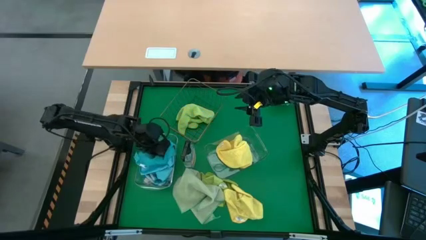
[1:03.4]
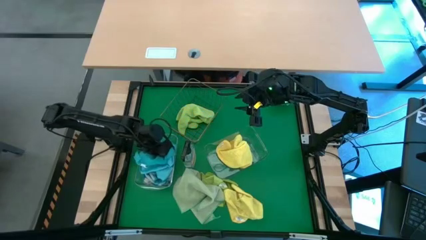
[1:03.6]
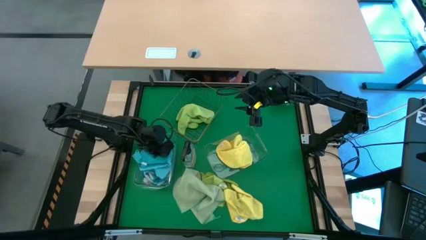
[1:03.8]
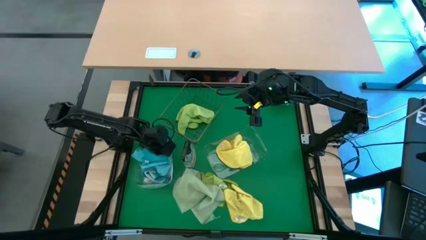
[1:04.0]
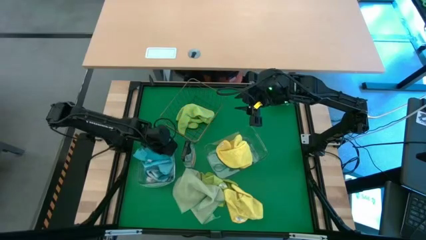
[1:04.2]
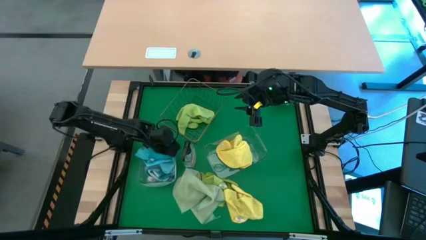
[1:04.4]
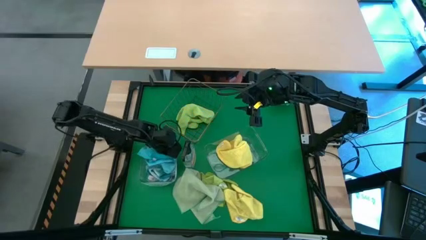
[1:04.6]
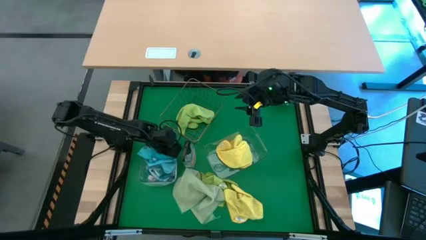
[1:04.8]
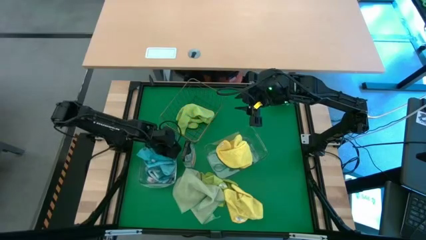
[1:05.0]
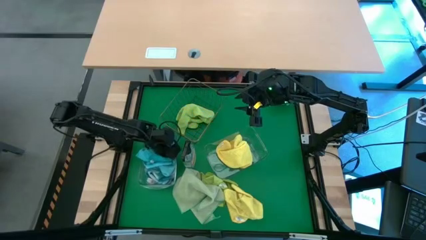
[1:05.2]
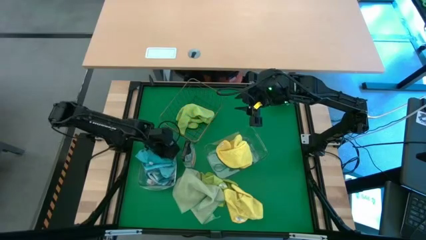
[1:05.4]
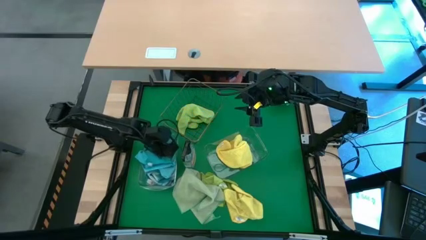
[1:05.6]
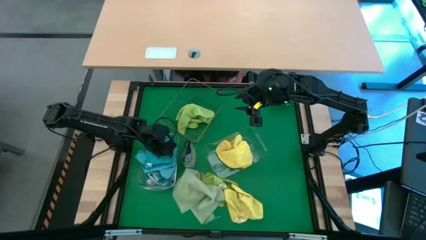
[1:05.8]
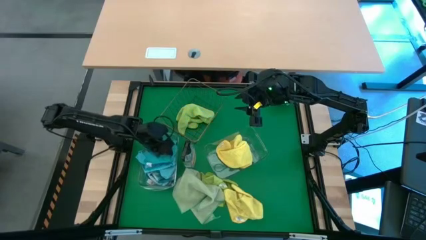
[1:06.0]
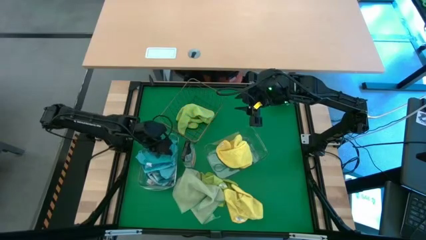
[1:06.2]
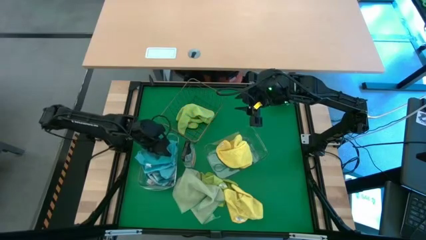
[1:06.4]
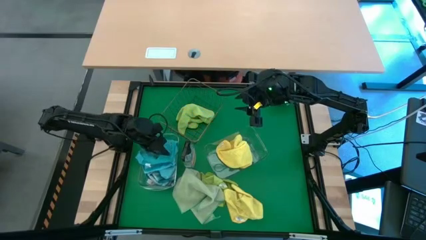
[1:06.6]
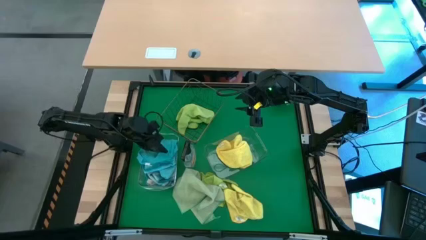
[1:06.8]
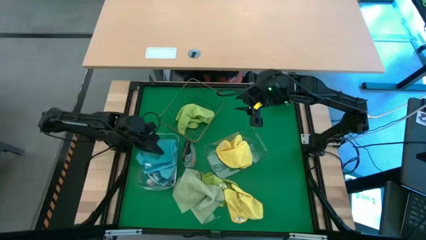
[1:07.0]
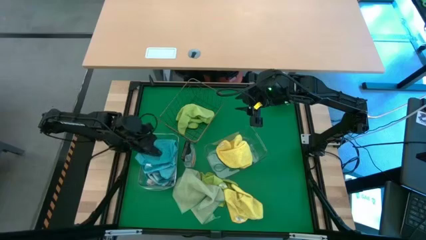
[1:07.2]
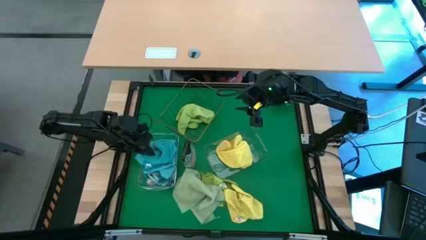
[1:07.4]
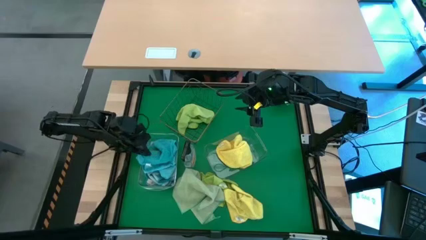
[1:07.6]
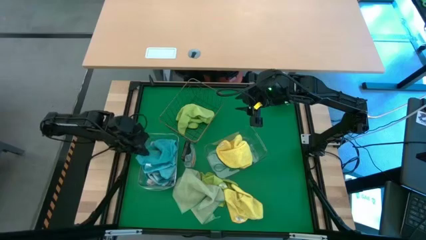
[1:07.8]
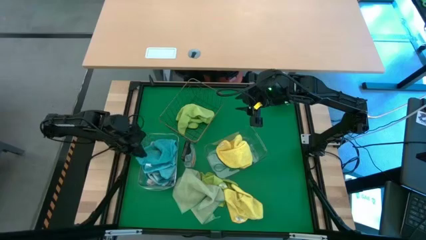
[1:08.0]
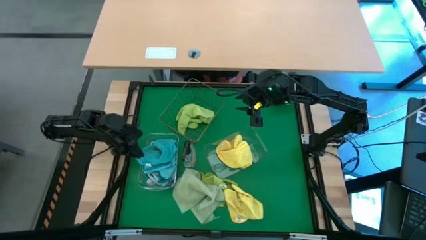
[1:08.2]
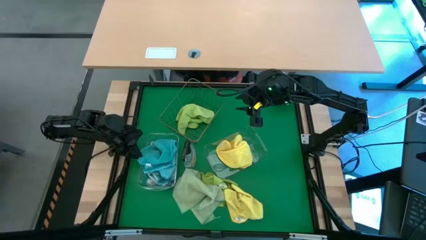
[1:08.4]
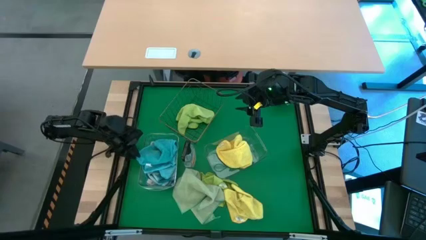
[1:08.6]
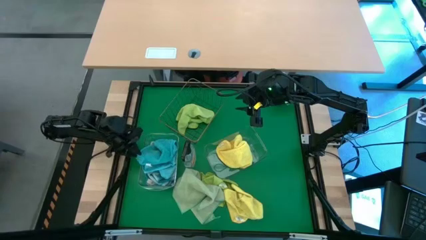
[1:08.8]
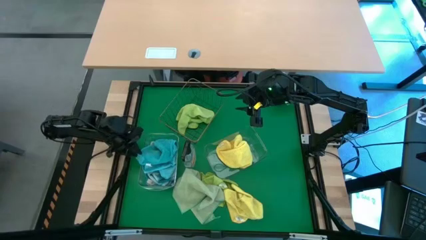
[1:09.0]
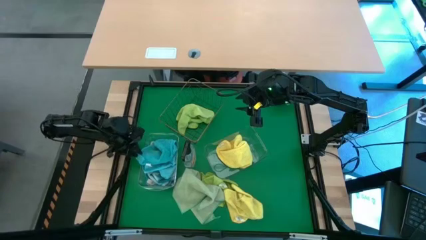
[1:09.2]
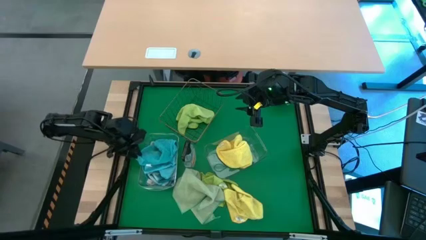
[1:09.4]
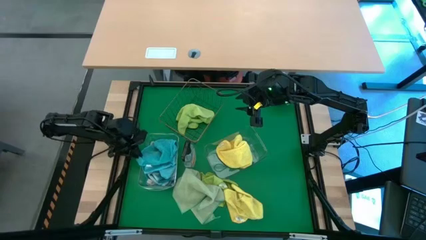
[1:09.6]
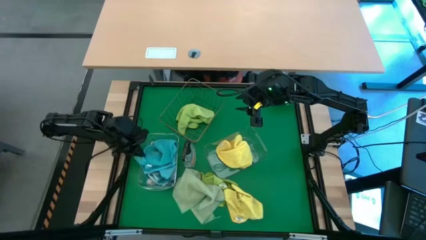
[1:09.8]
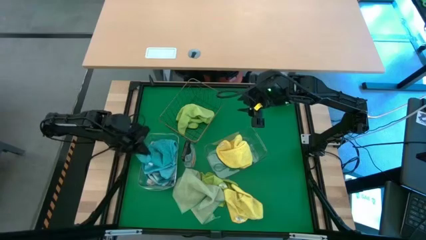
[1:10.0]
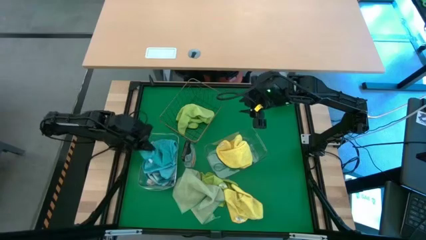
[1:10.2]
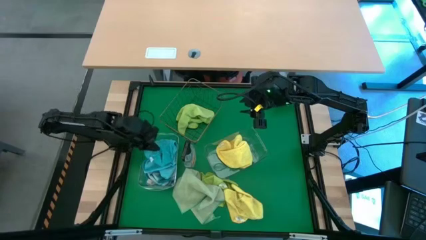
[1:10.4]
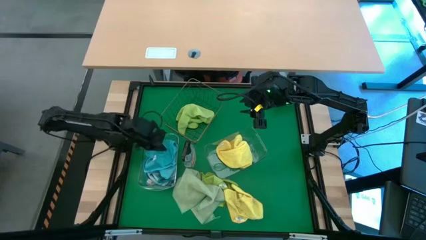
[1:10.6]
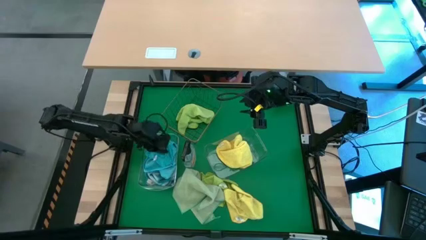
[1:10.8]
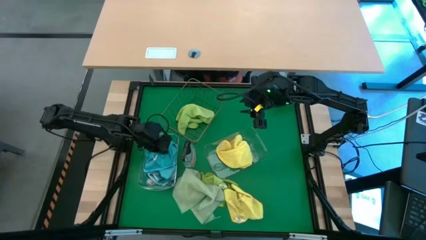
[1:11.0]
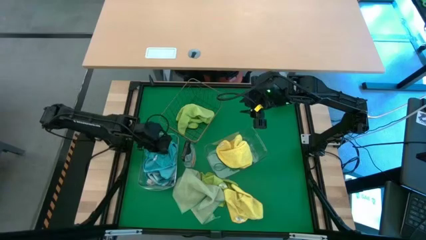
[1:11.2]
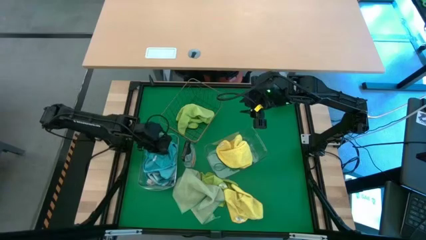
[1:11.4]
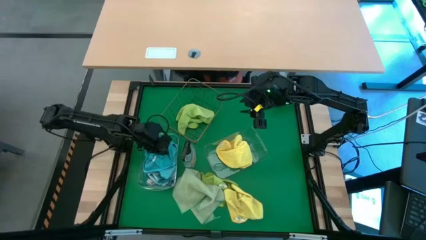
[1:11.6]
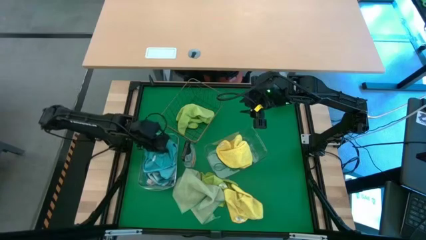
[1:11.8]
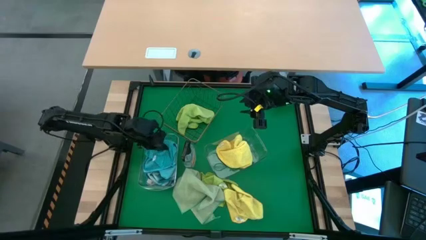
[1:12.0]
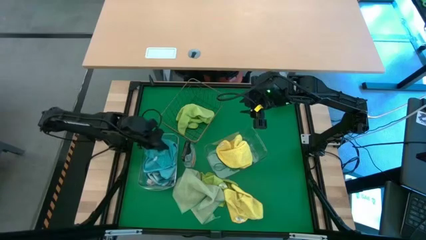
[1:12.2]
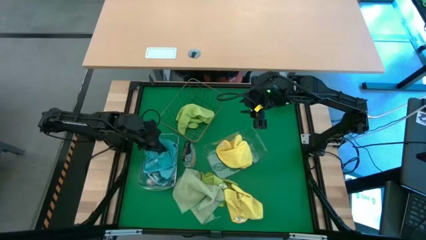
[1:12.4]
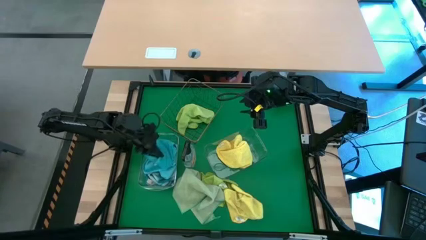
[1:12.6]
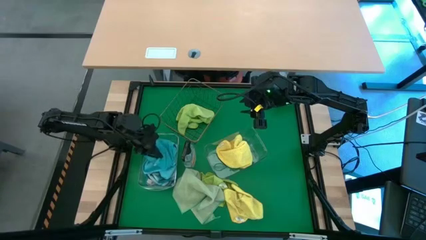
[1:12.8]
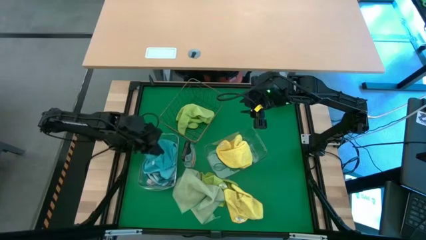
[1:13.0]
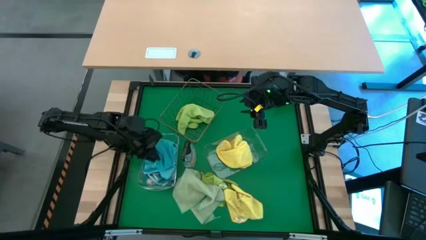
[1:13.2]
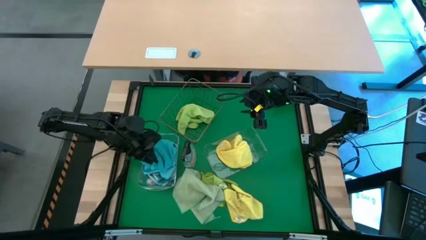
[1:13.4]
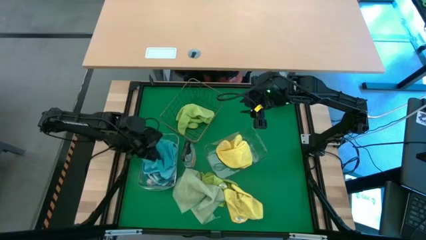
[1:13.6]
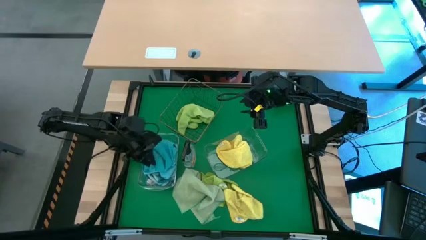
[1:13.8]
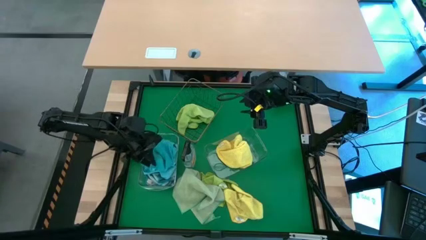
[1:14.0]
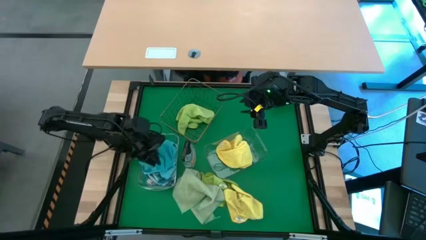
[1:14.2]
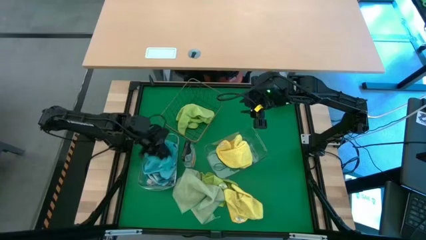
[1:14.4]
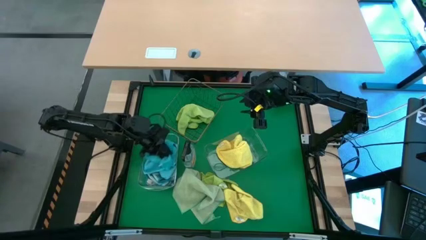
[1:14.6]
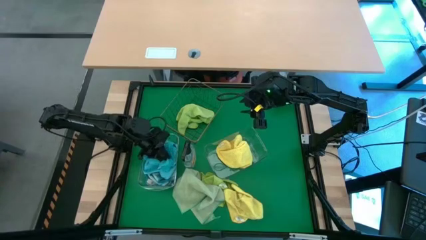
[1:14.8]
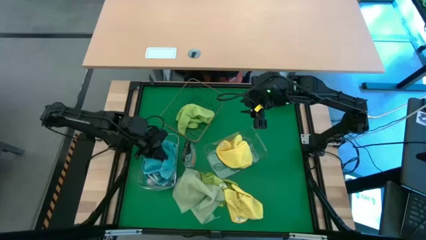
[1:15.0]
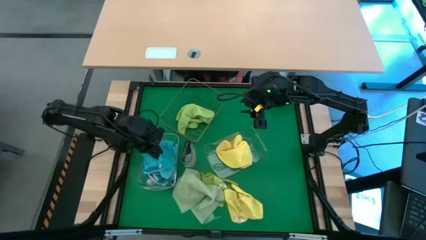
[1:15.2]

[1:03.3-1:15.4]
Task: Sort microfiber towel by color & place in baskets
Put the blue microfiber towel into the left transparent bin

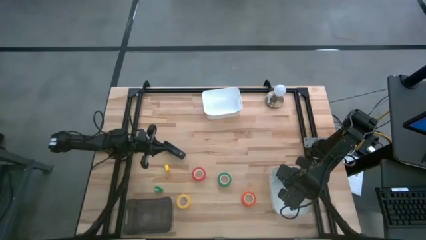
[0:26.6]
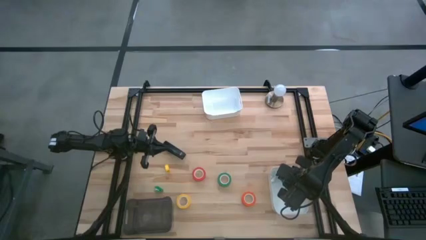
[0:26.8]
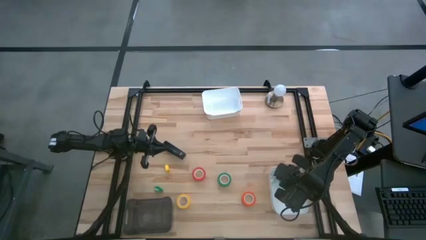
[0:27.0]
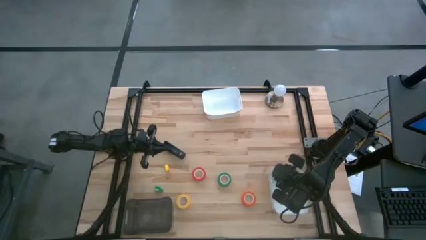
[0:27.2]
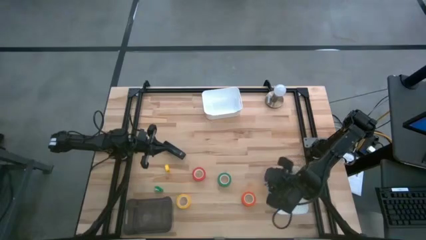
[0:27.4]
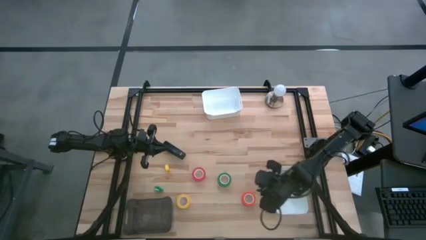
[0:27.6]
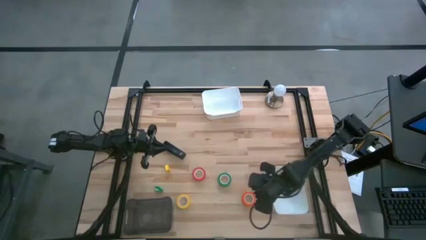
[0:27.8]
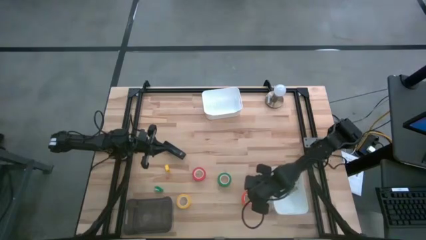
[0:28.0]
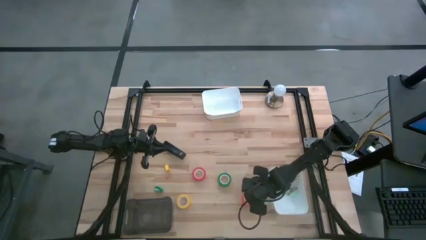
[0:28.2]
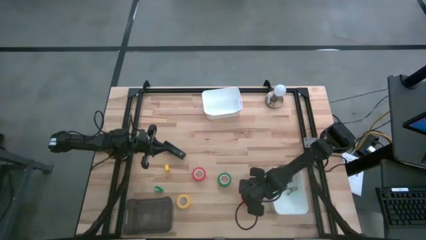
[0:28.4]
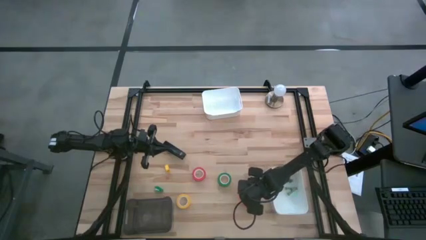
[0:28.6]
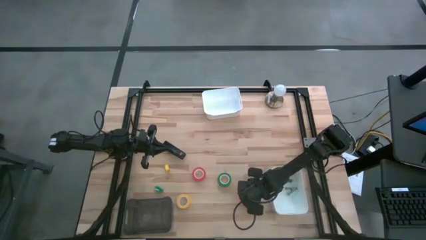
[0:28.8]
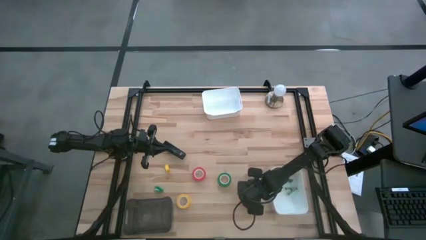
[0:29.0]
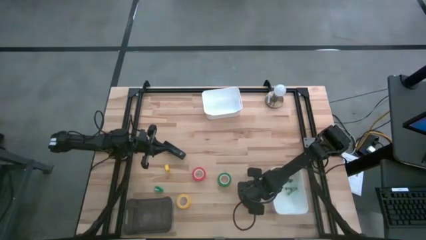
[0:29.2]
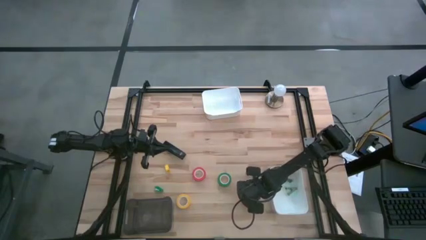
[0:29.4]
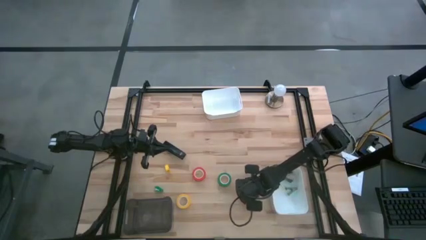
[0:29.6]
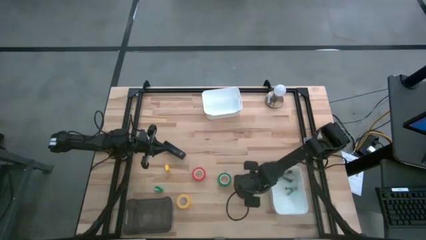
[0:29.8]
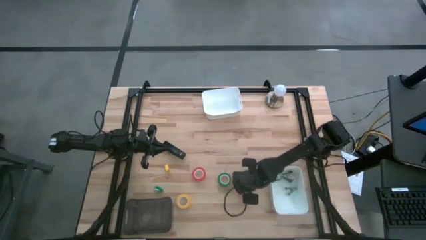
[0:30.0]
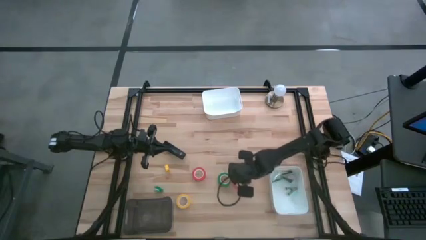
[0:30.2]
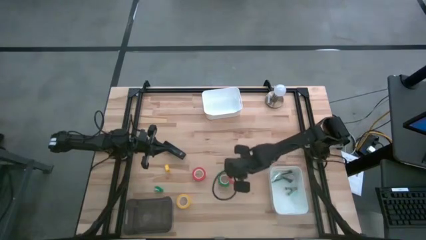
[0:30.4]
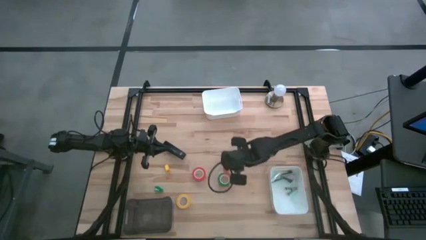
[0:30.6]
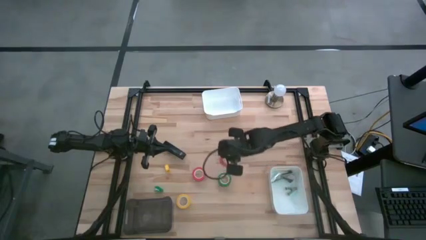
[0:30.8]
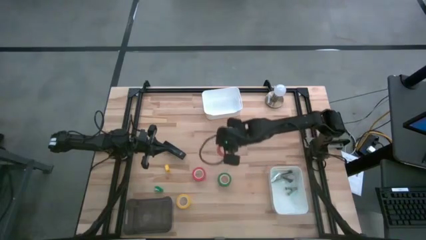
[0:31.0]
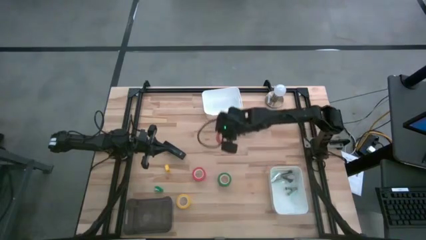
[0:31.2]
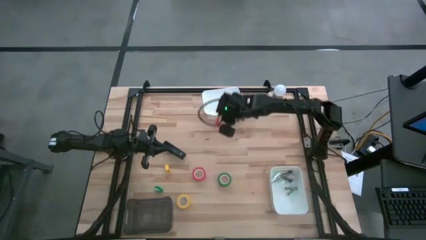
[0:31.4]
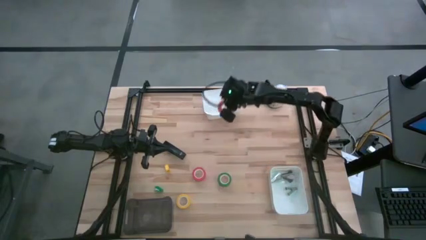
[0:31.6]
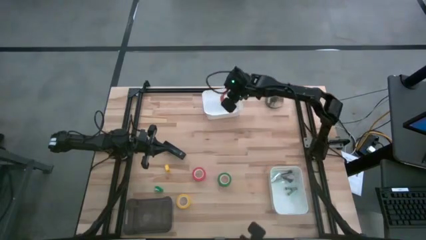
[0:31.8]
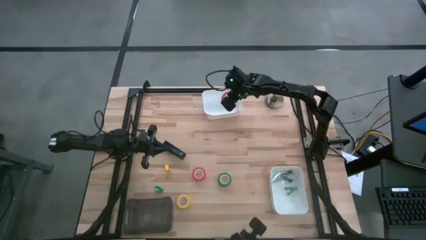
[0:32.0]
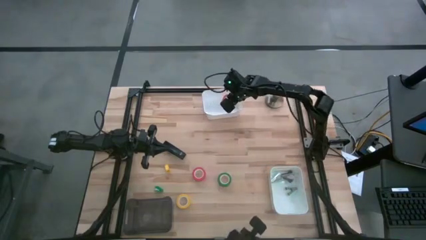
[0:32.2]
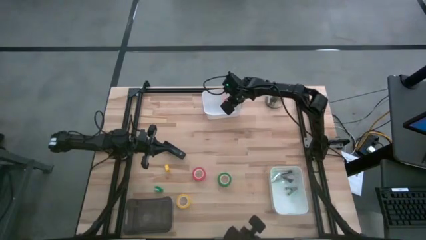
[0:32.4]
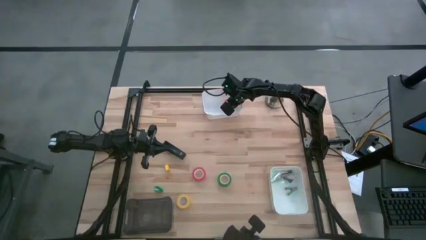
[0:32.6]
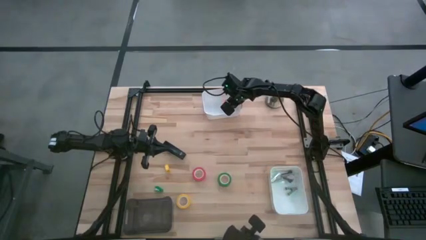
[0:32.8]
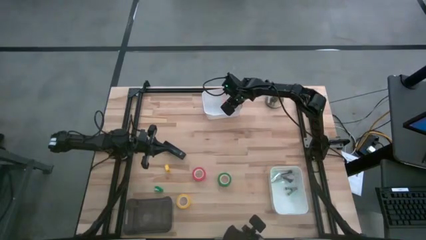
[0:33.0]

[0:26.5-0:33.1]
Task: Pick and place Stapler, Stapler remover, tape
Put the orange tape into the top white bin
